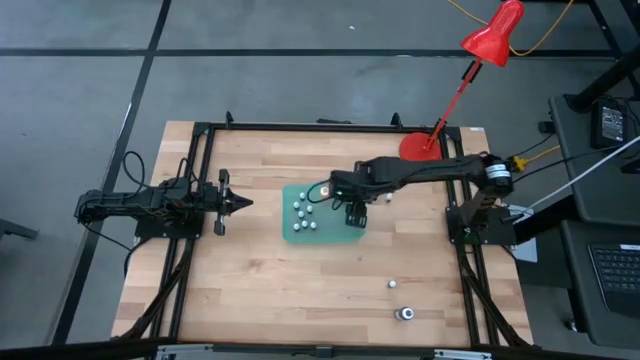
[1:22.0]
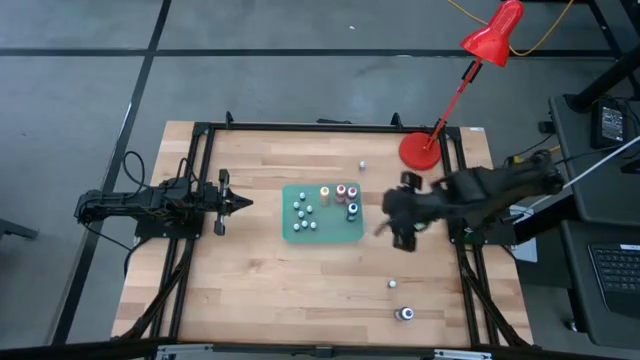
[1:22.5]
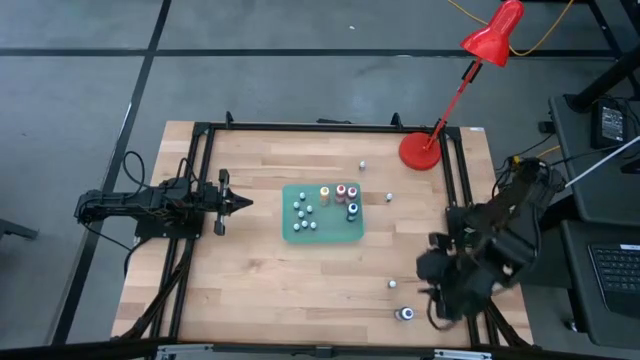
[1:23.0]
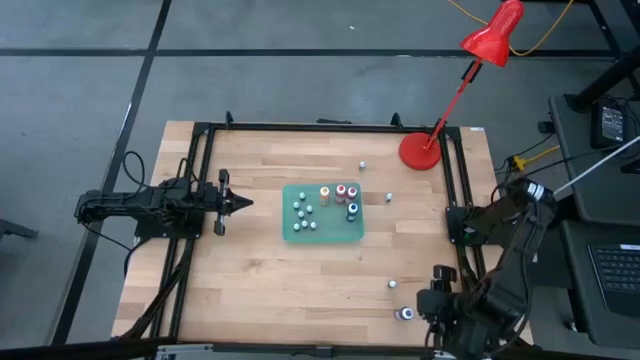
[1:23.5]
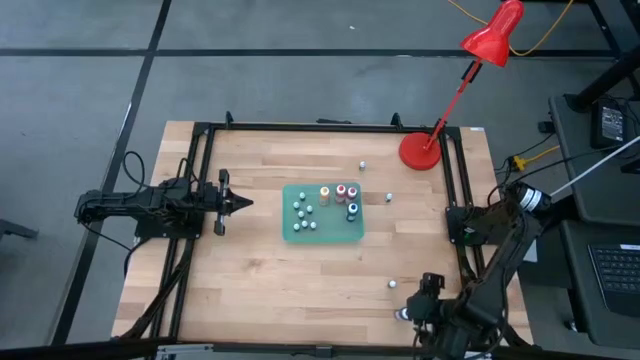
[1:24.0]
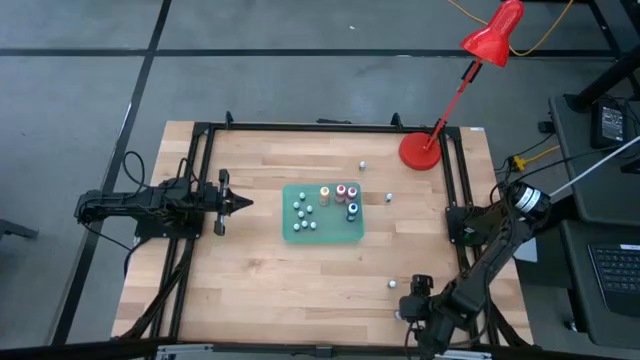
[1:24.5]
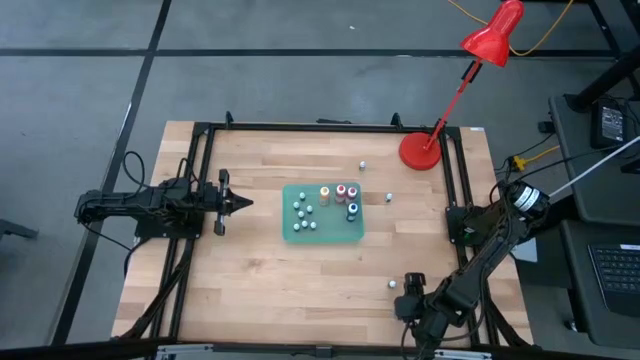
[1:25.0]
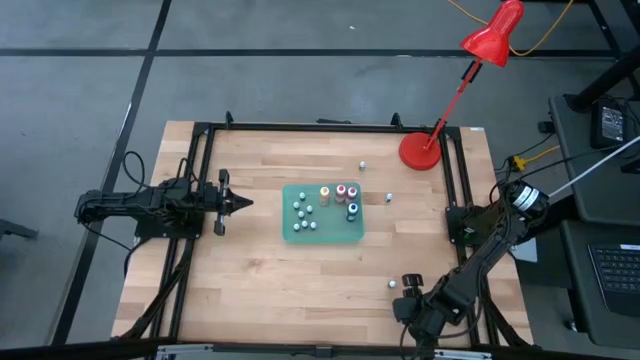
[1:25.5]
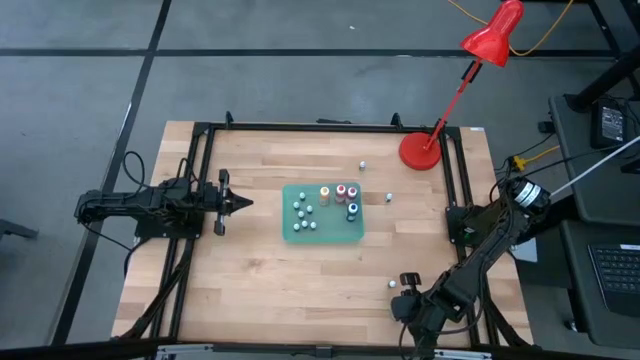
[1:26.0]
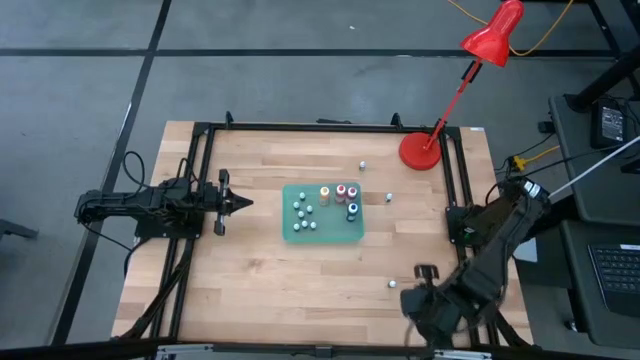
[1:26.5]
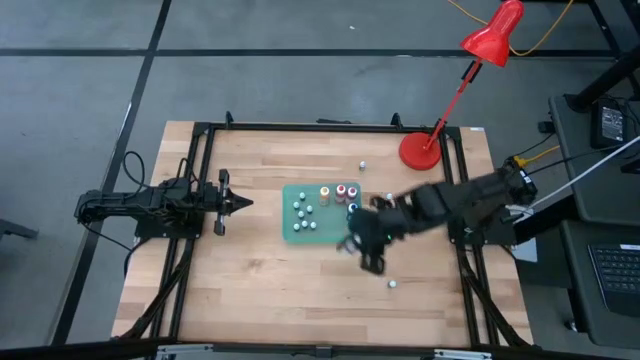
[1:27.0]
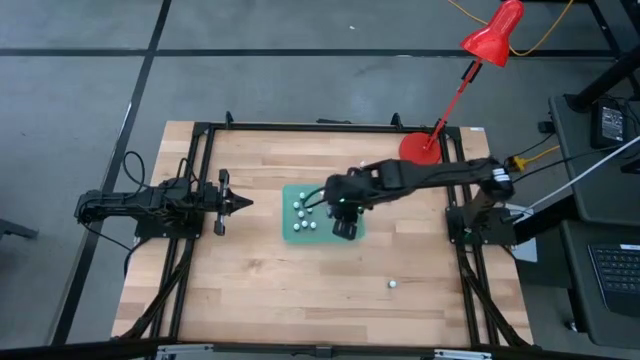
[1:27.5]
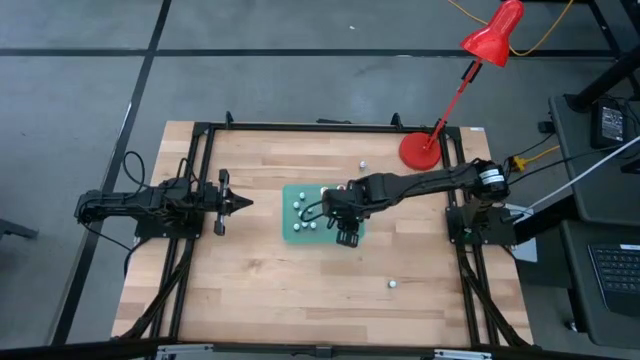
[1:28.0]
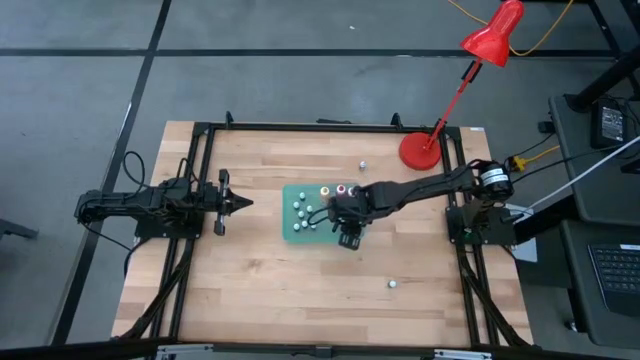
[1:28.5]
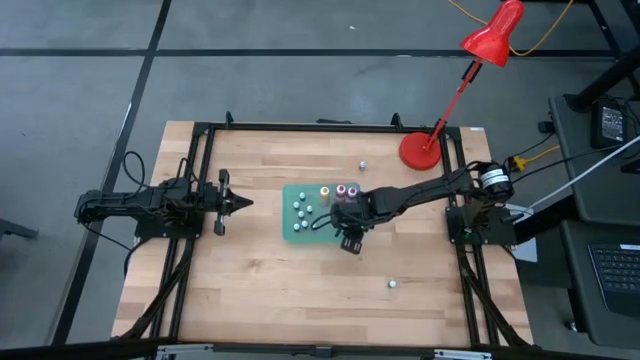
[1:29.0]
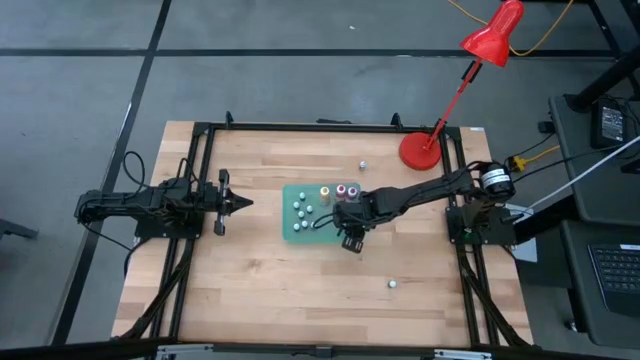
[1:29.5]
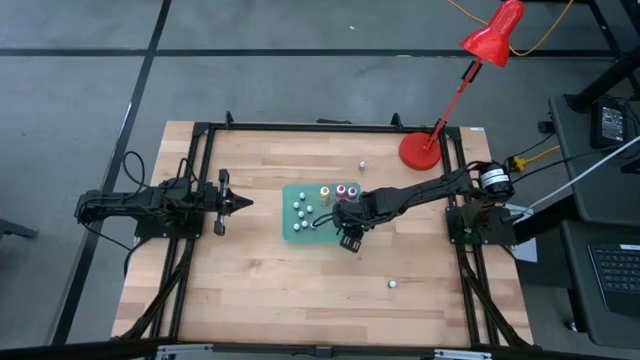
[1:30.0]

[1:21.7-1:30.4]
Task: Pick & Place food coloring
Put the big purple food coloring bottle into the green bin

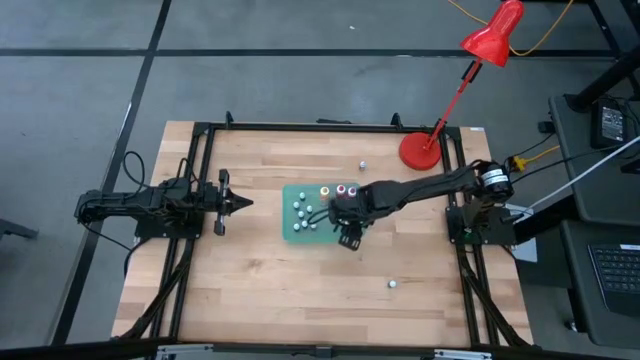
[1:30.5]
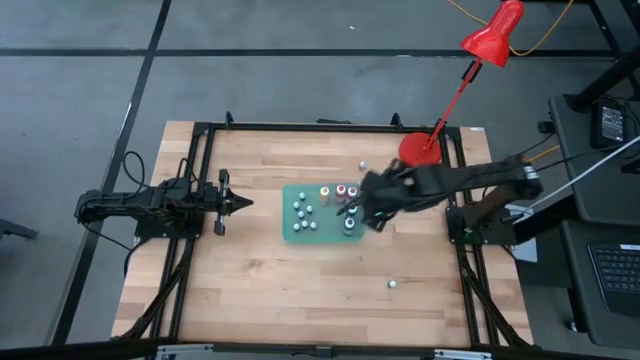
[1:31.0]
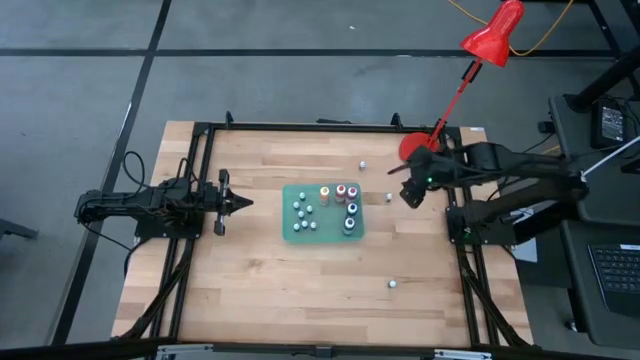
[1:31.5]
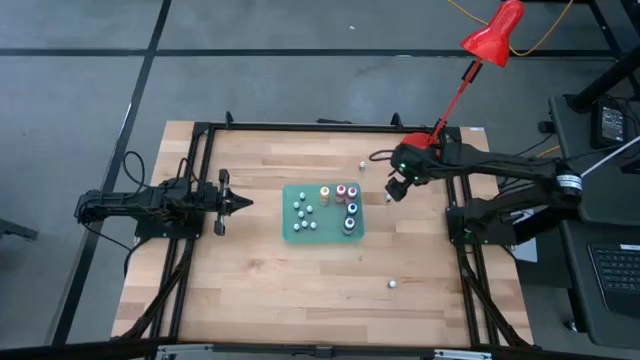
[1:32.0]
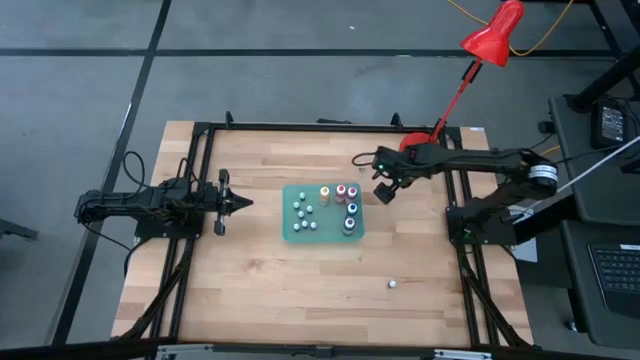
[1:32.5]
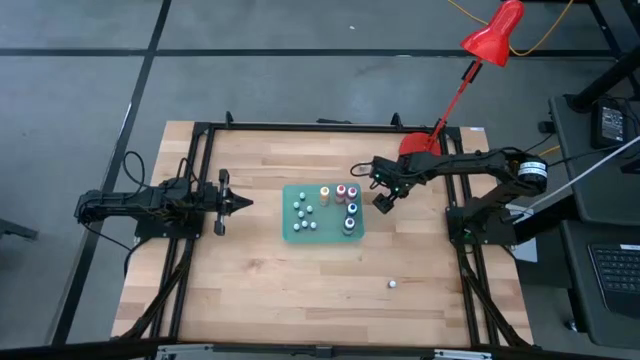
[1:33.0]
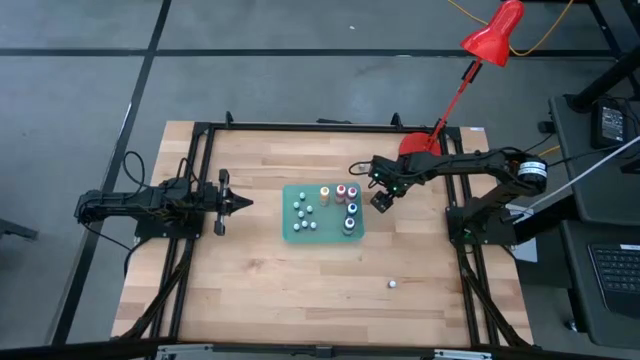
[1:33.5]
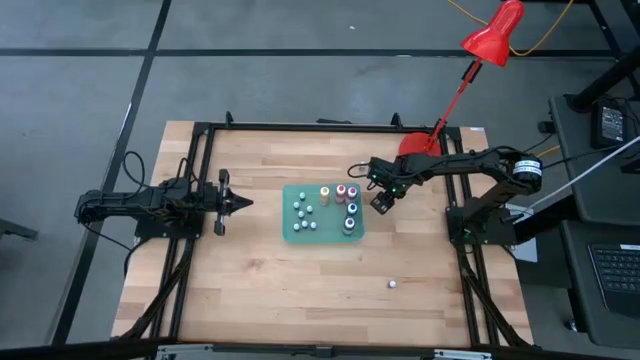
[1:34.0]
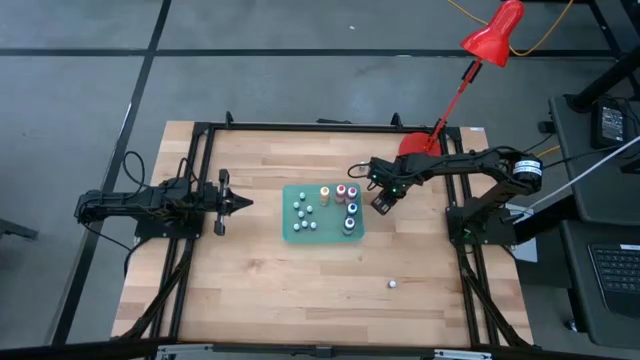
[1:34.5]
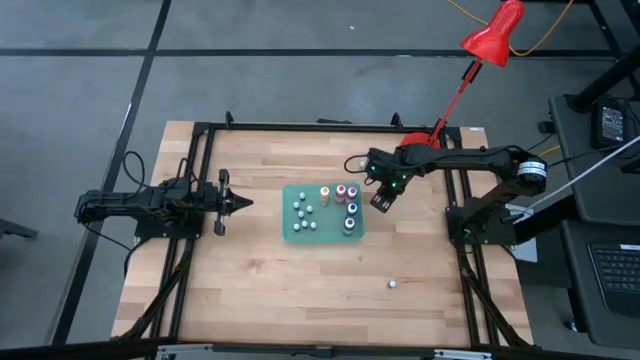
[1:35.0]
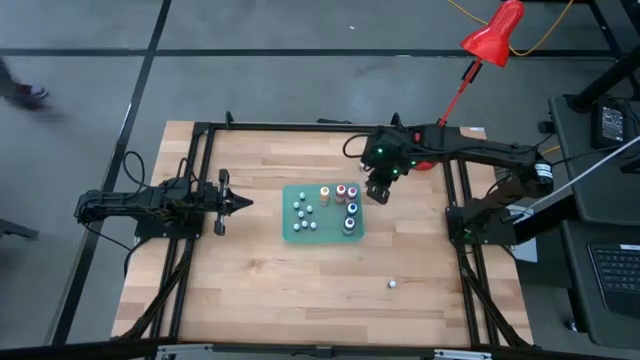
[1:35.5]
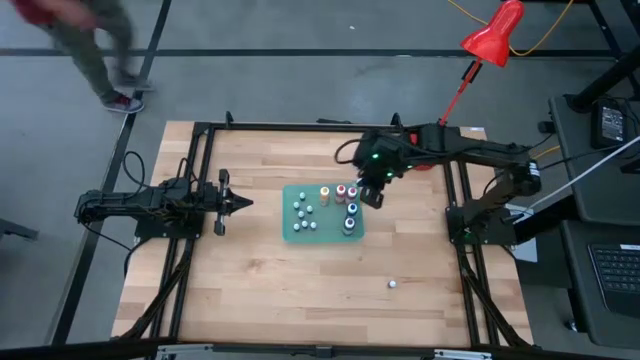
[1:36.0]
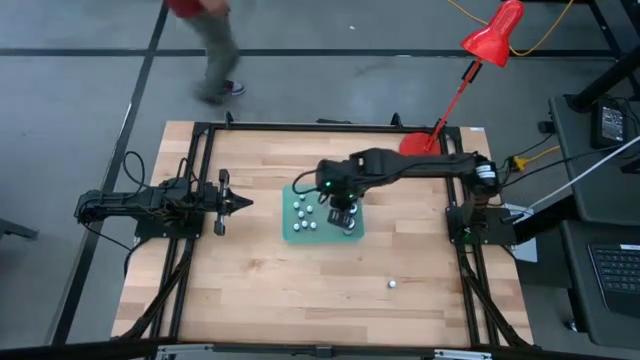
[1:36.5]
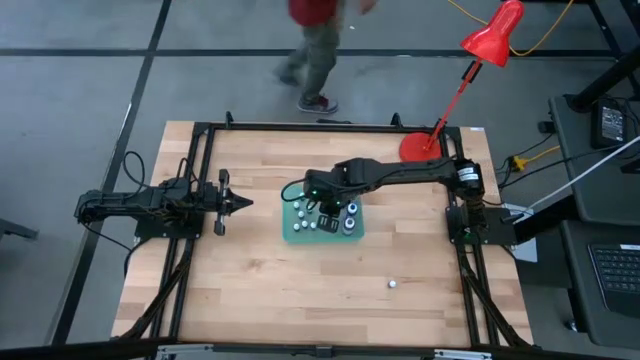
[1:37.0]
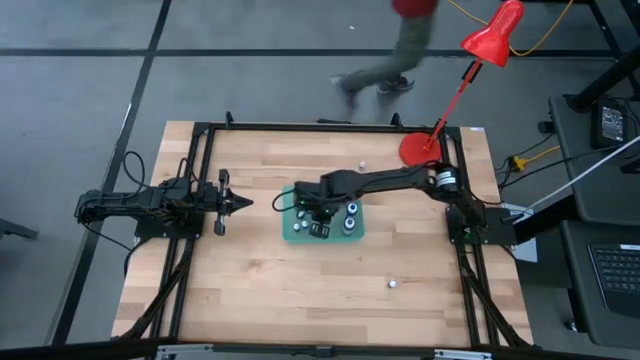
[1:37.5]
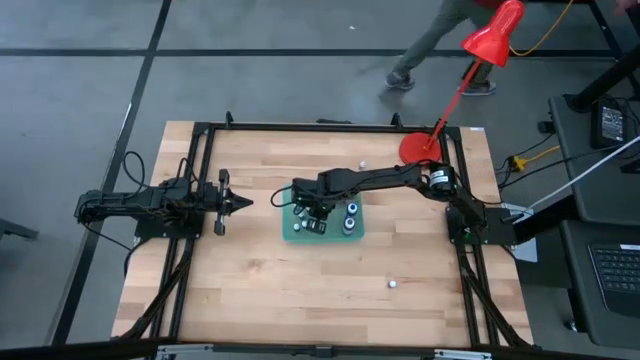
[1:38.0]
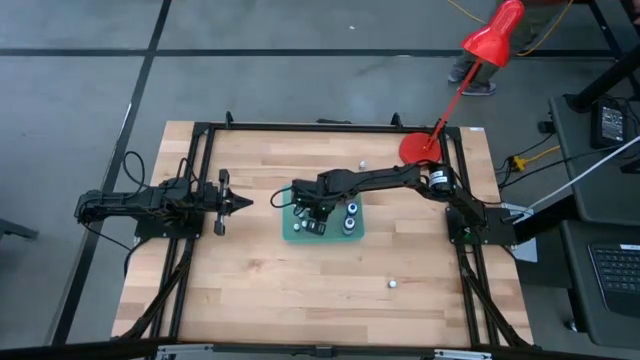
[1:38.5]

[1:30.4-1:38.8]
Put the small purple food coloring bottle into the green bin

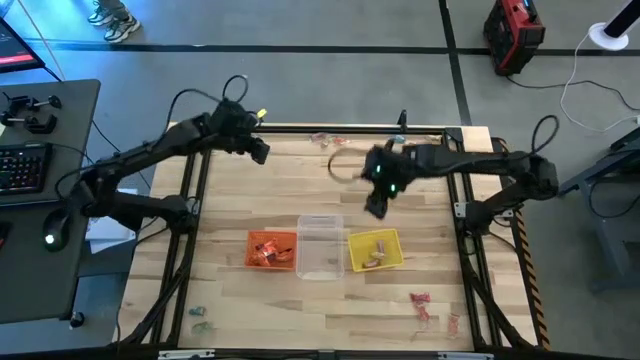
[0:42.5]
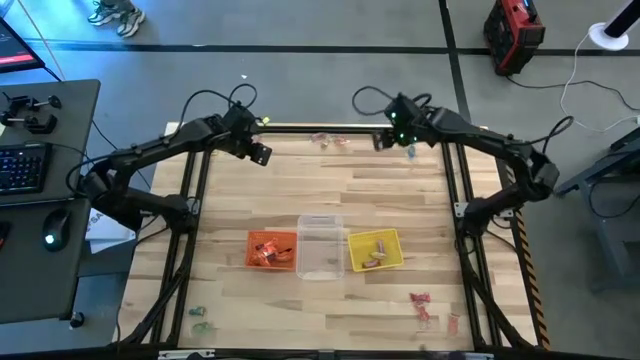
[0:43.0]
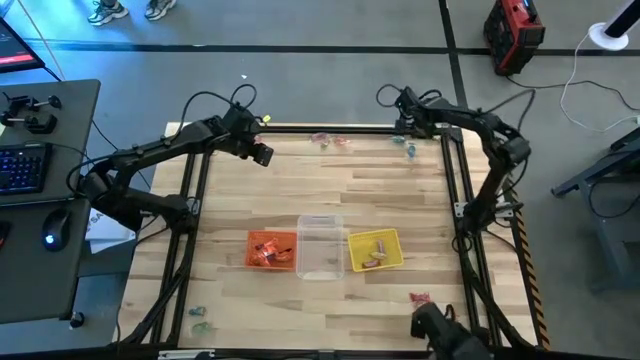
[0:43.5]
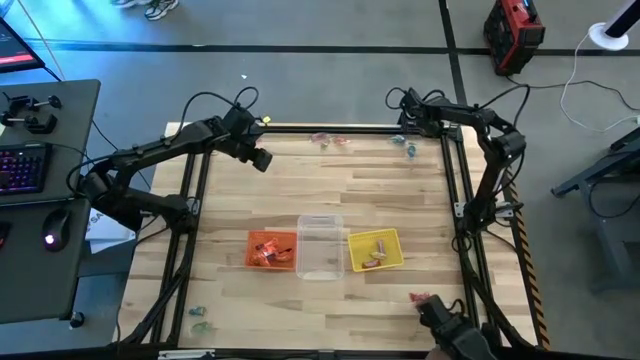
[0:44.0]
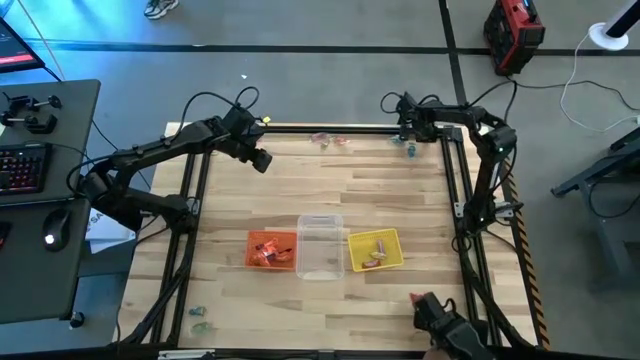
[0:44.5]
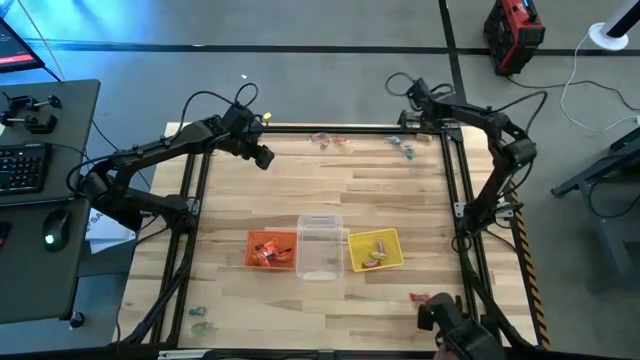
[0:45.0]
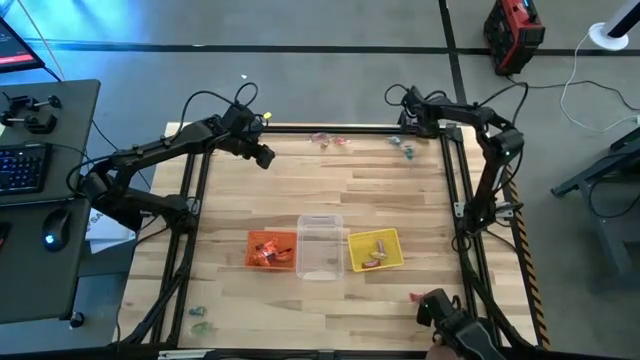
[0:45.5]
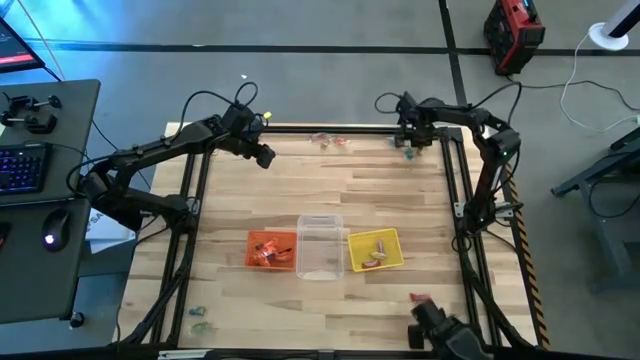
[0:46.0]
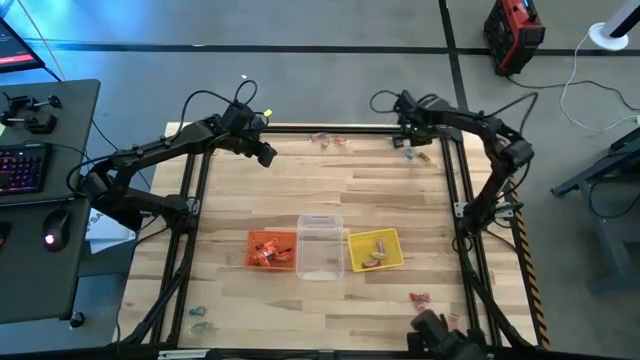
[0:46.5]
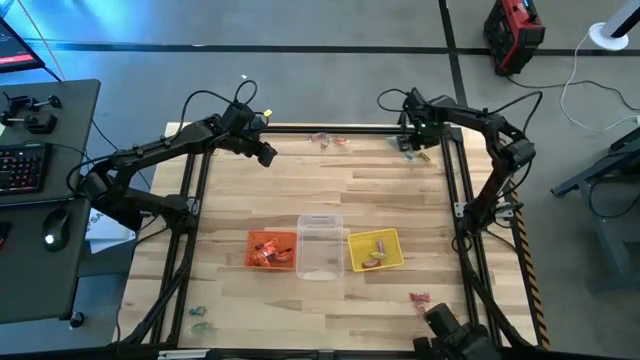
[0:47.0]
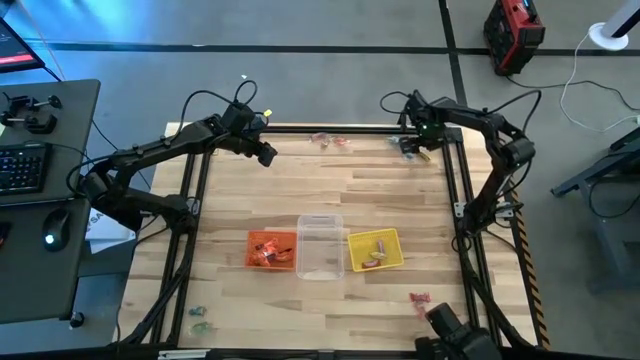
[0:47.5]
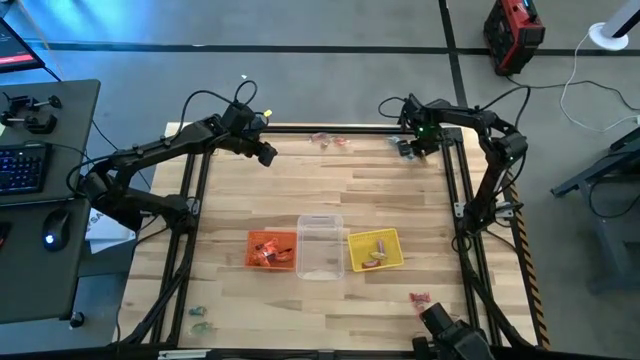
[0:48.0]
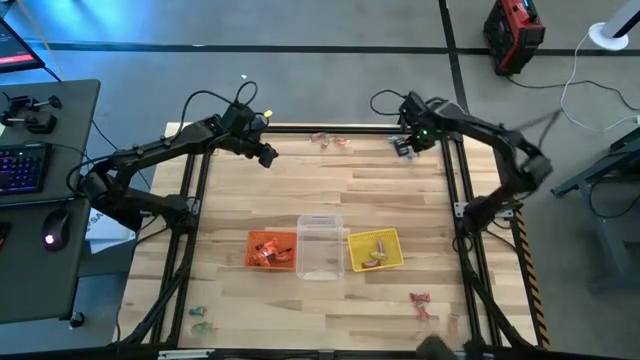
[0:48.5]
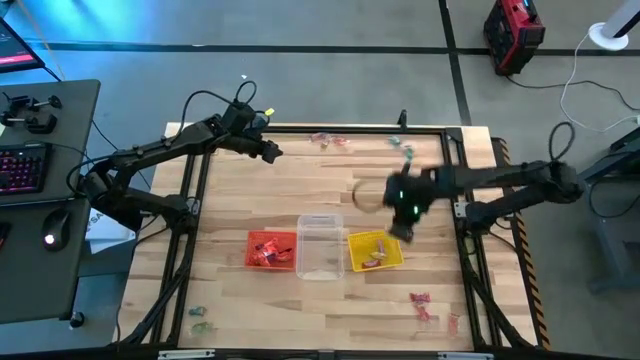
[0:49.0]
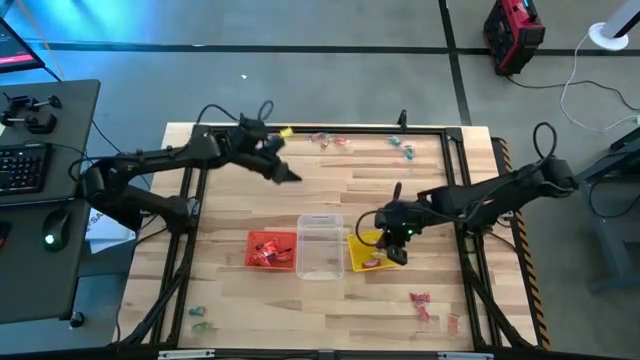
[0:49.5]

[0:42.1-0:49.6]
Task: Sort candy by brand, put in halloween buckets
Put the yellow candy into the yellow bin
